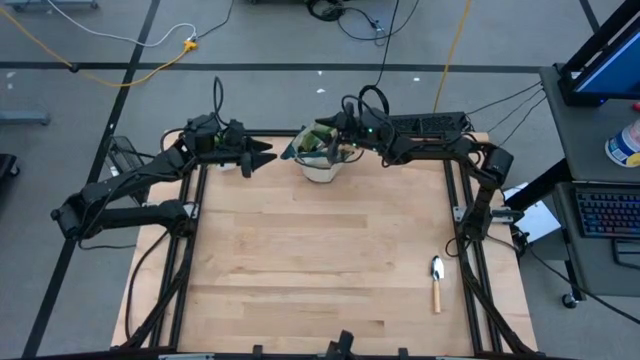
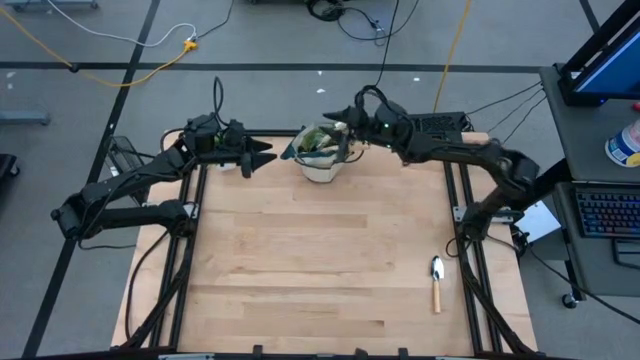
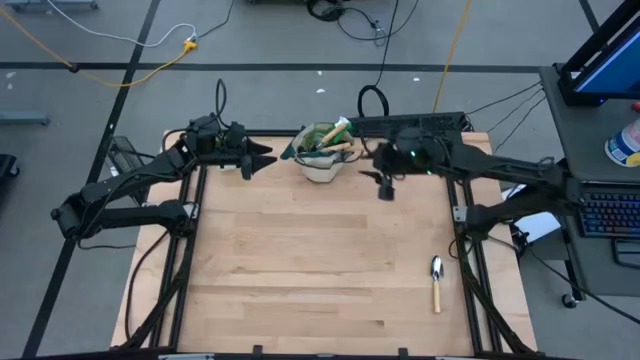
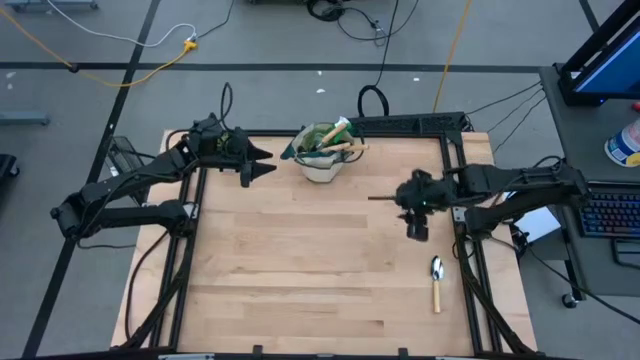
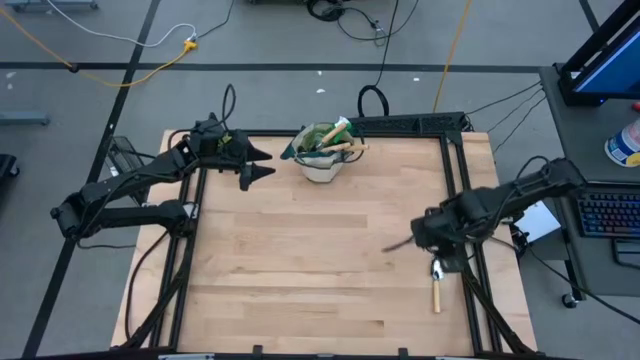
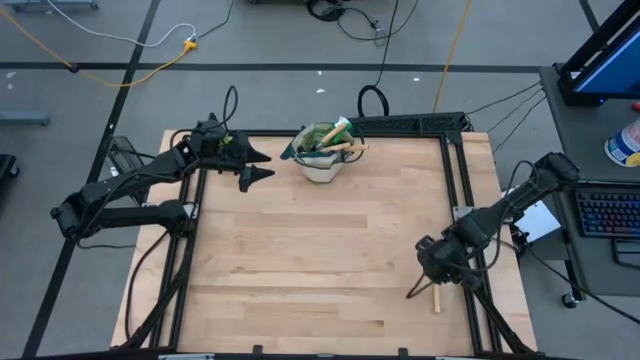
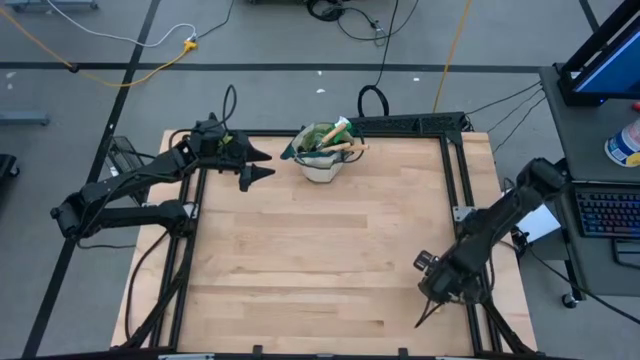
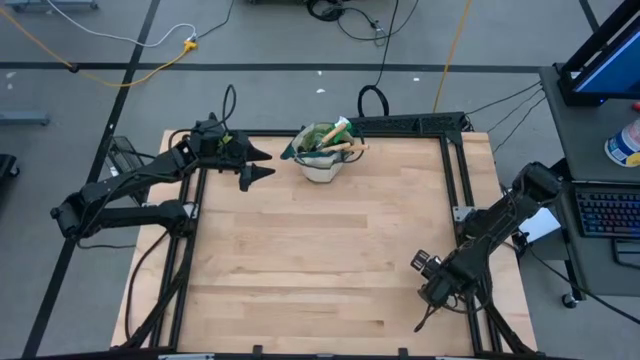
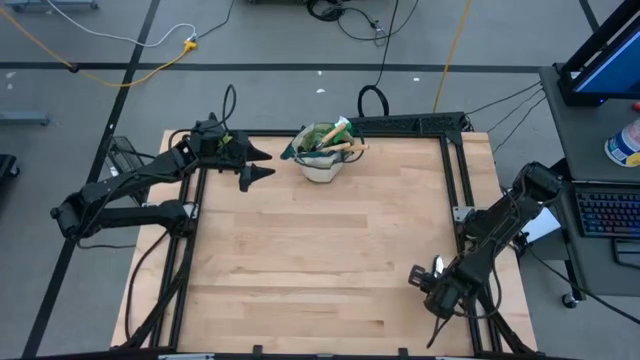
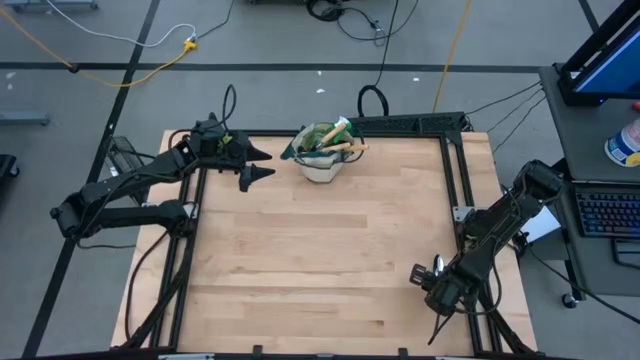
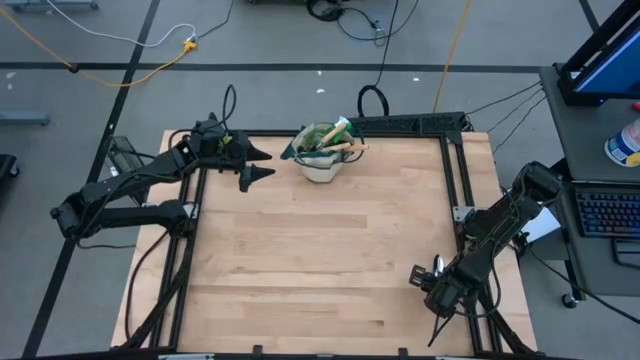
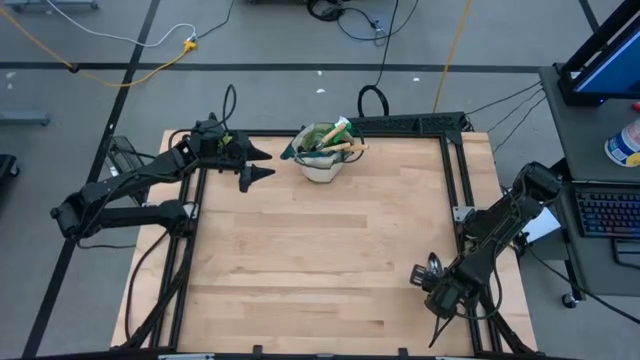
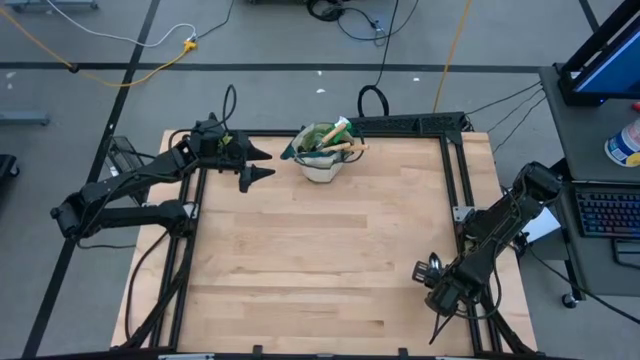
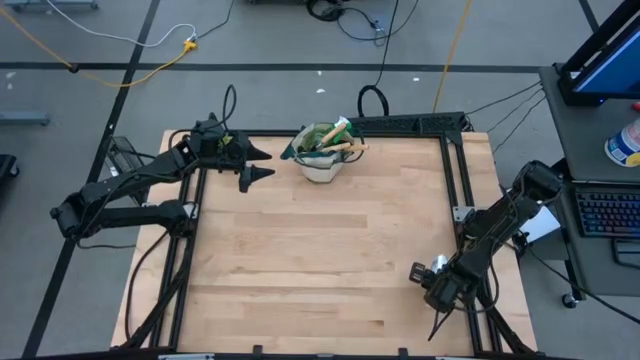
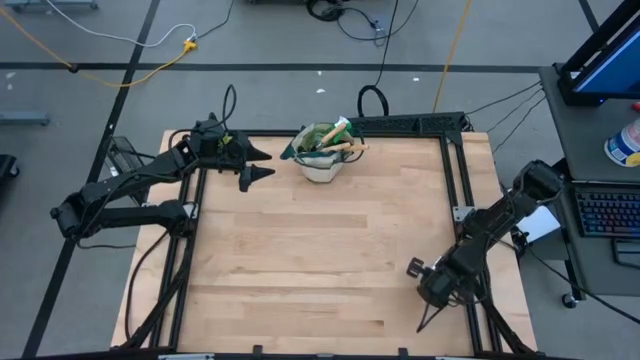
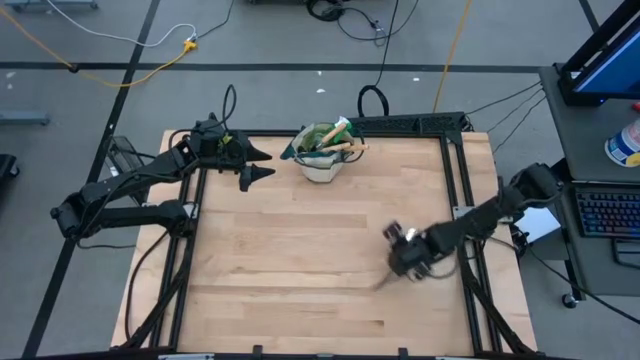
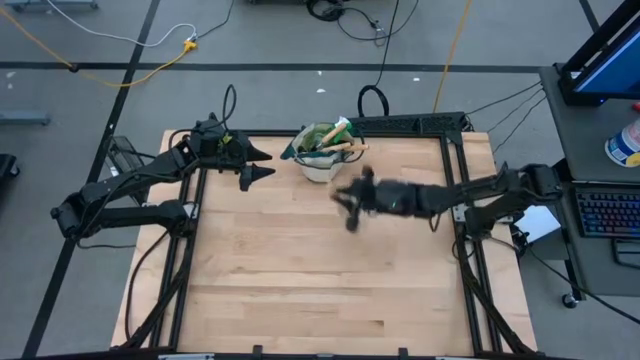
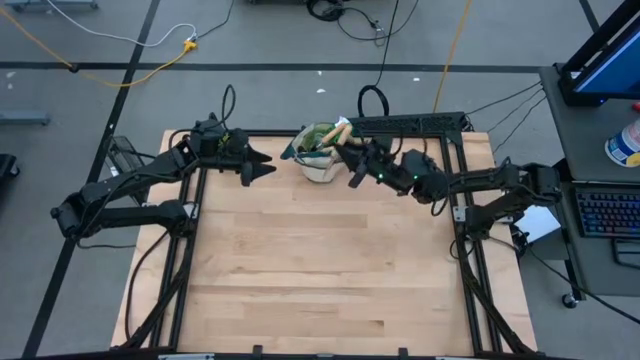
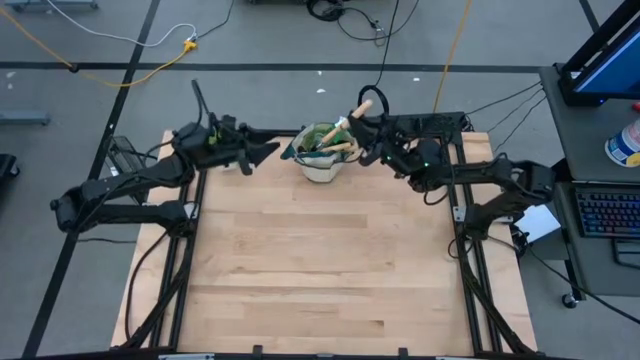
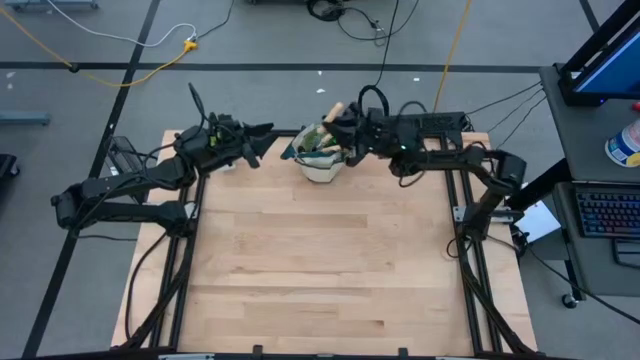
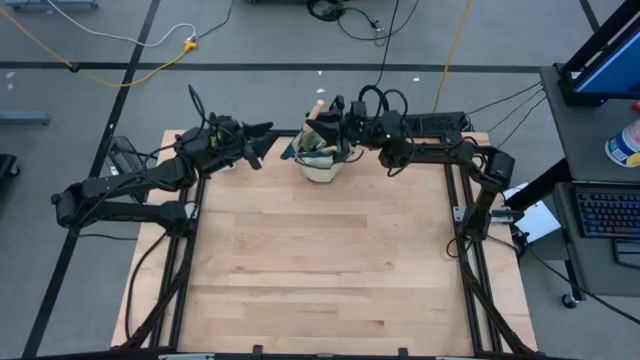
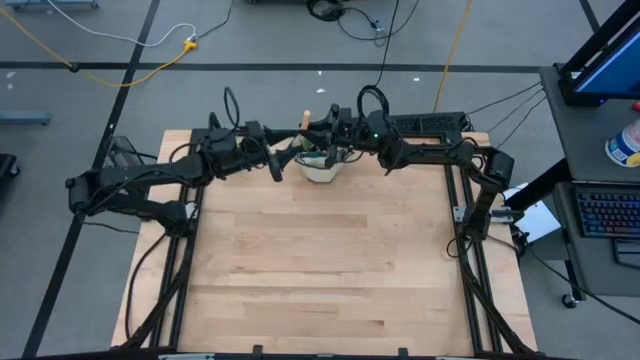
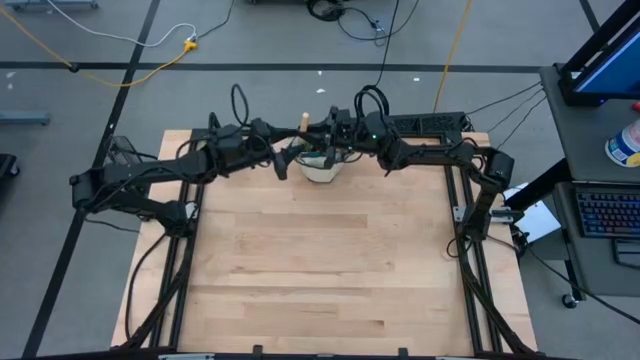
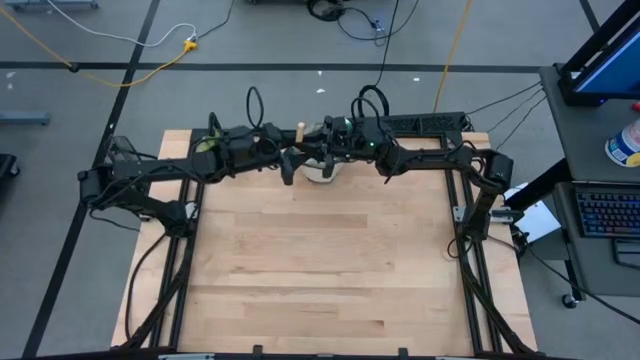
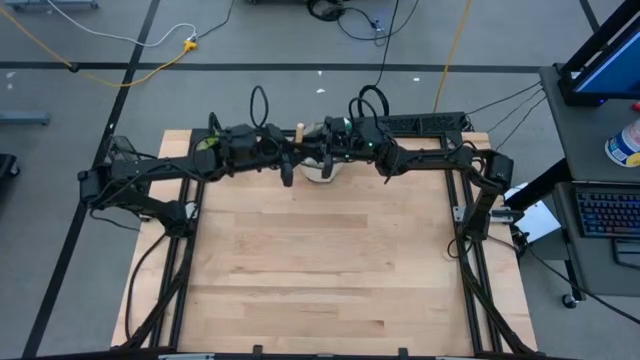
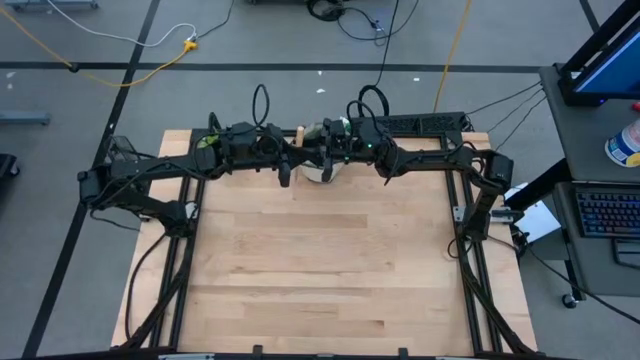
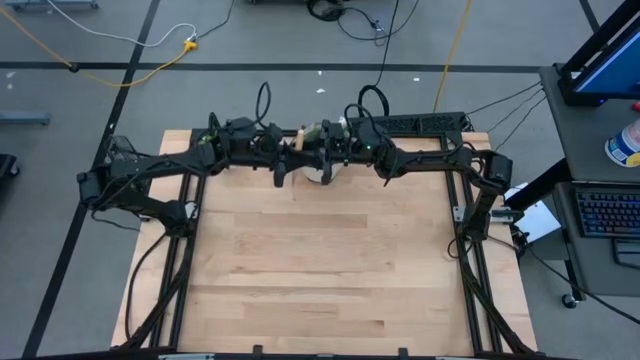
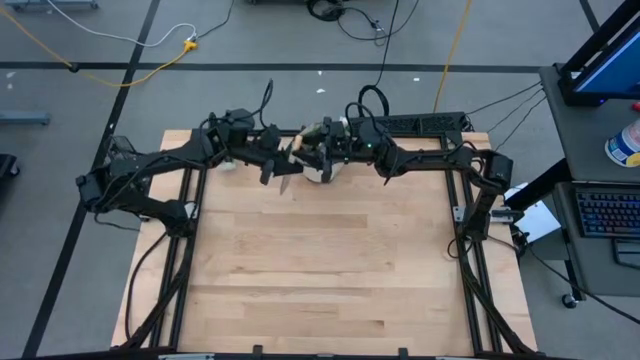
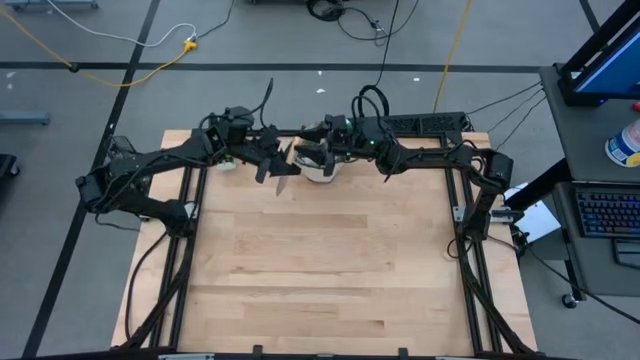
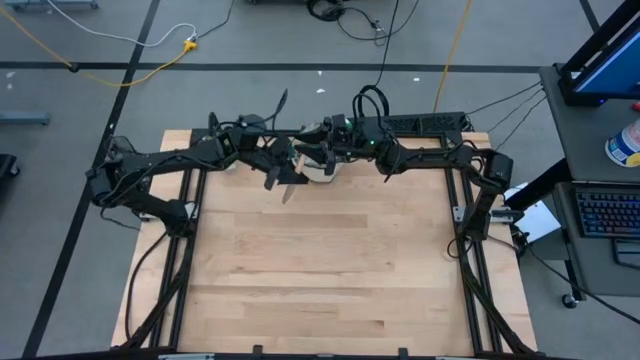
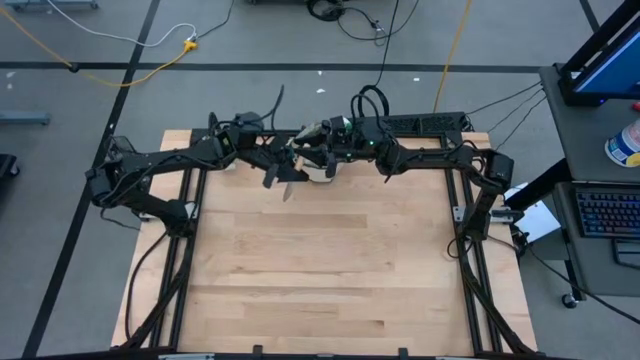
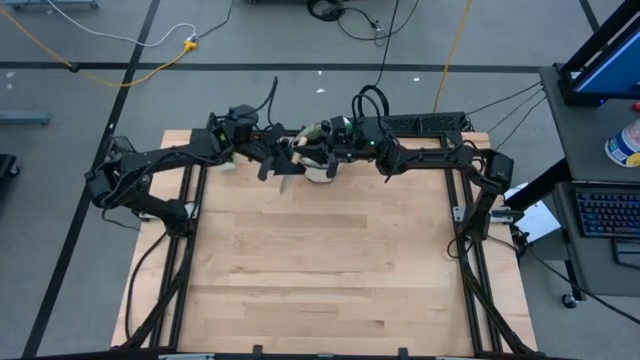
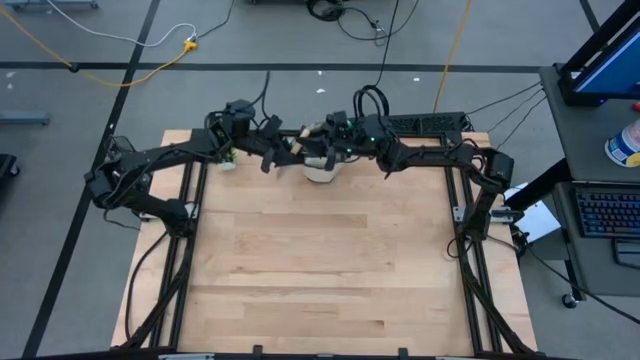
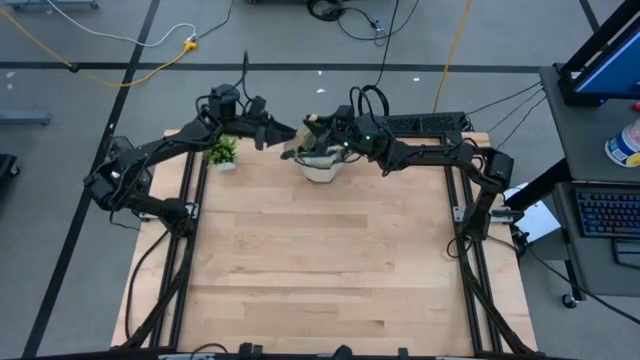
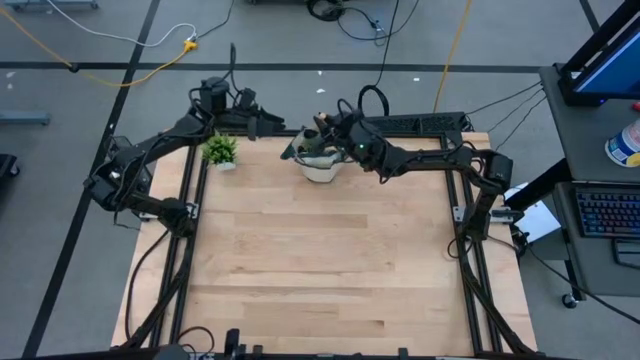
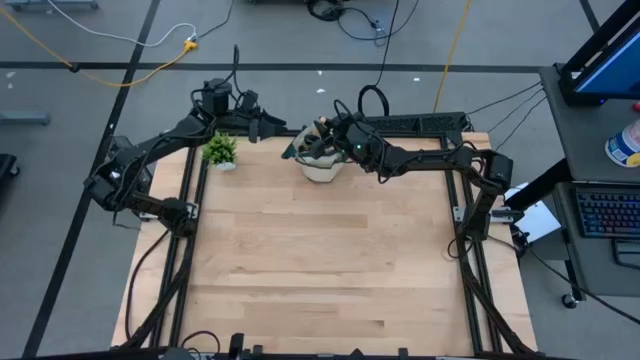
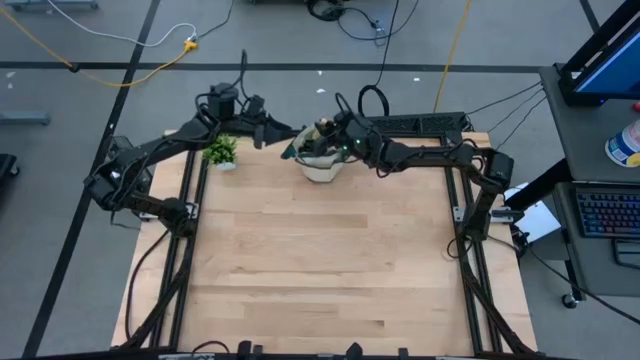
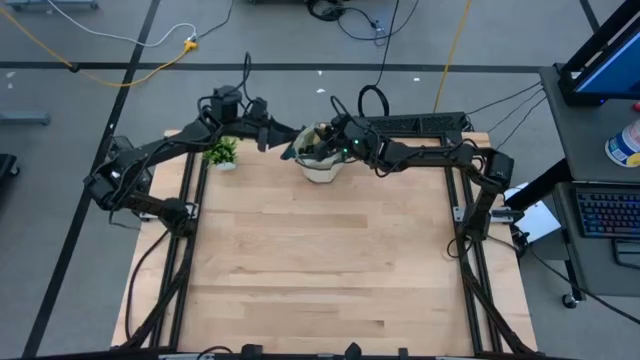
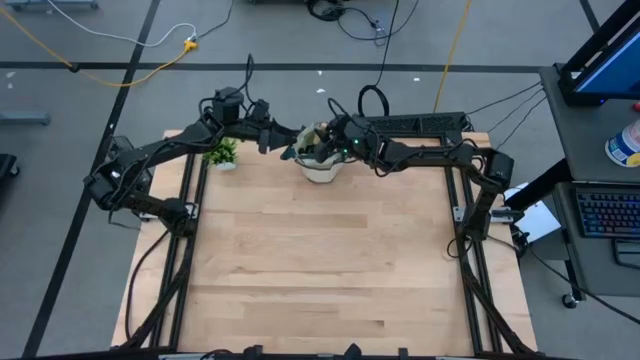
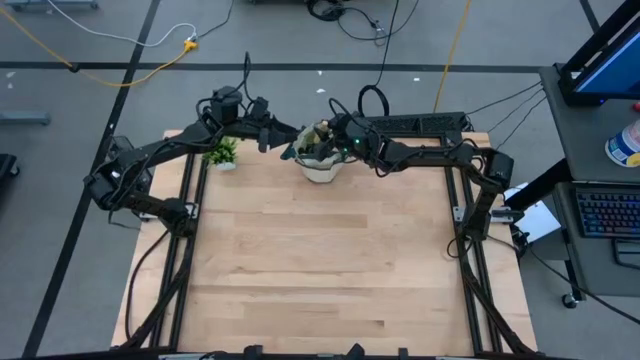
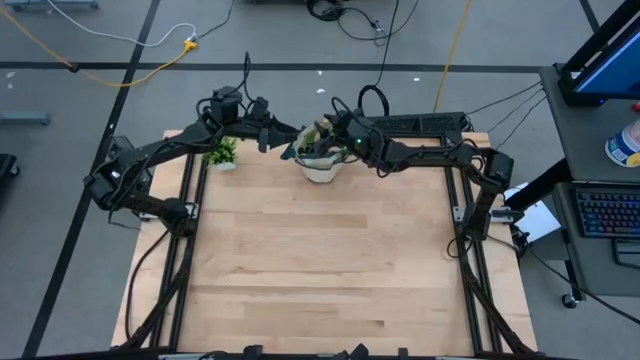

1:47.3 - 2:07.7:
Task: Pick & Place Garden tools in Gardening bag
Put the brown trowel into the green gardening bag
